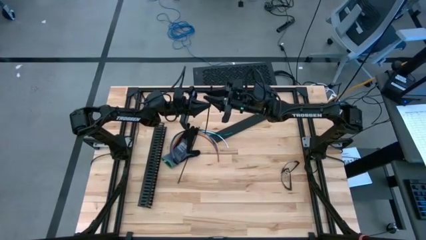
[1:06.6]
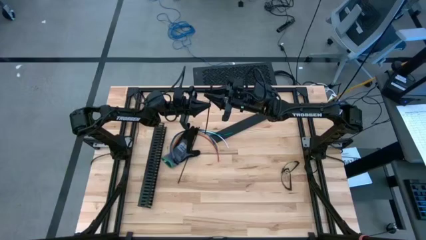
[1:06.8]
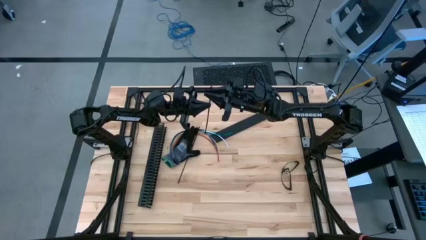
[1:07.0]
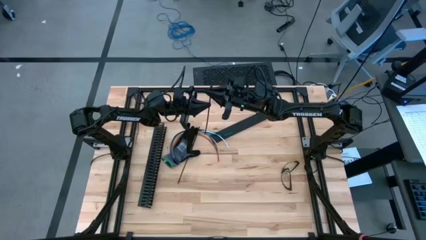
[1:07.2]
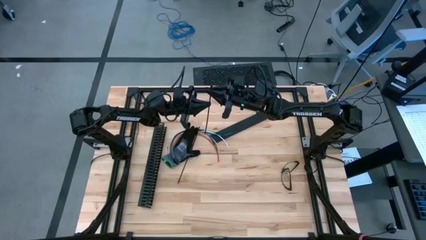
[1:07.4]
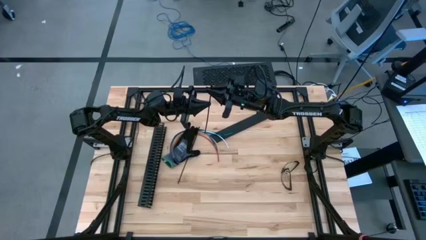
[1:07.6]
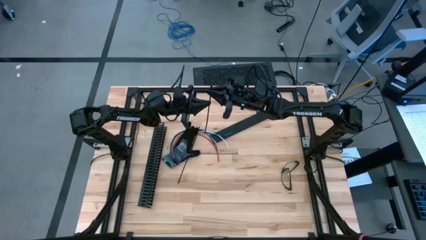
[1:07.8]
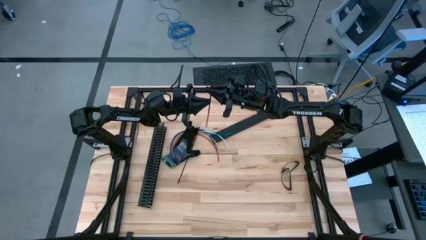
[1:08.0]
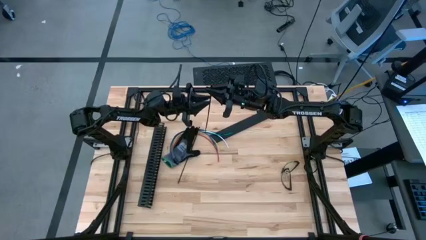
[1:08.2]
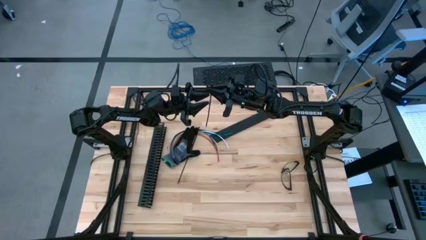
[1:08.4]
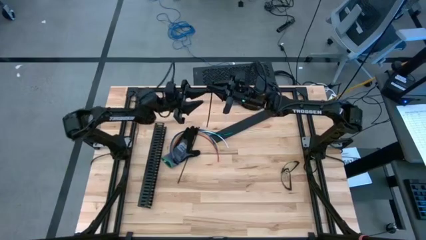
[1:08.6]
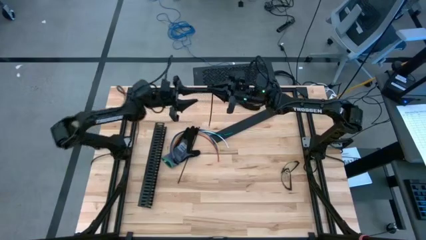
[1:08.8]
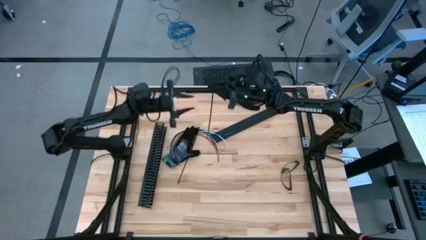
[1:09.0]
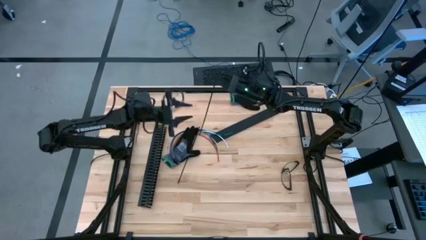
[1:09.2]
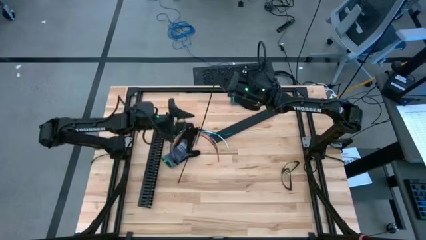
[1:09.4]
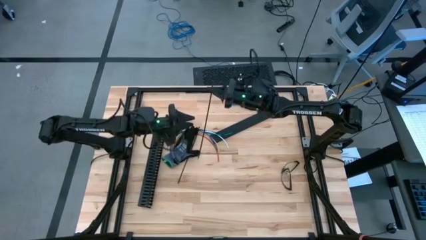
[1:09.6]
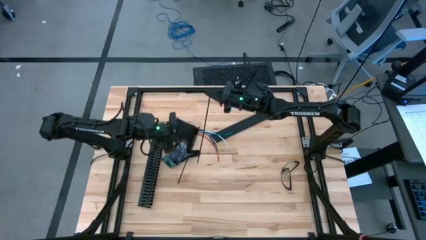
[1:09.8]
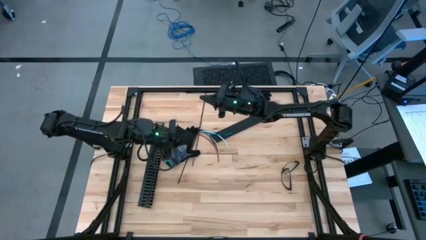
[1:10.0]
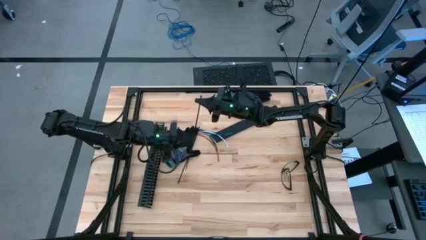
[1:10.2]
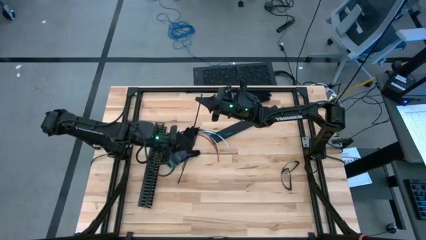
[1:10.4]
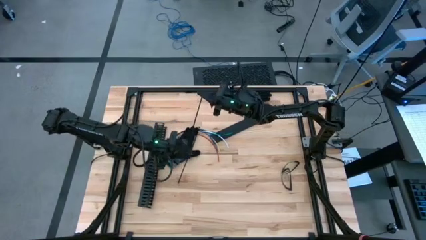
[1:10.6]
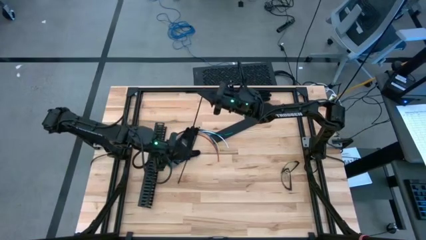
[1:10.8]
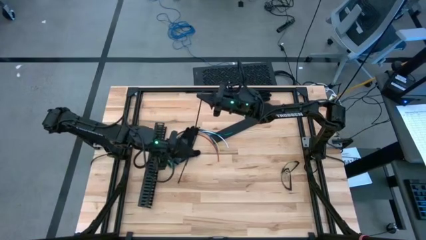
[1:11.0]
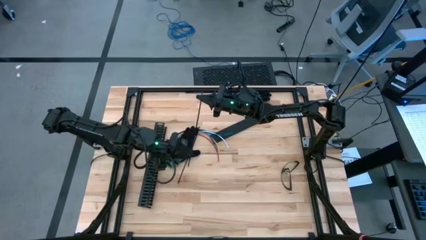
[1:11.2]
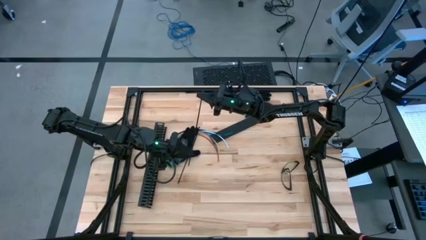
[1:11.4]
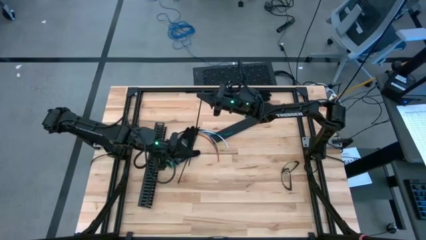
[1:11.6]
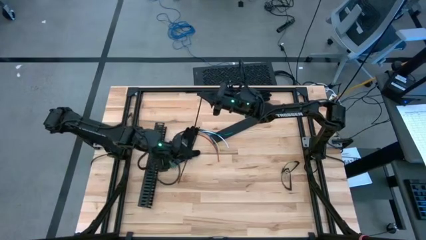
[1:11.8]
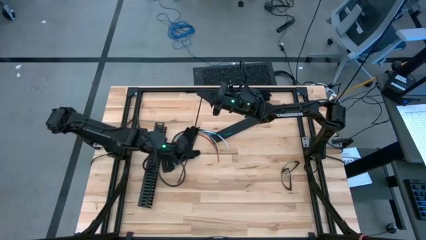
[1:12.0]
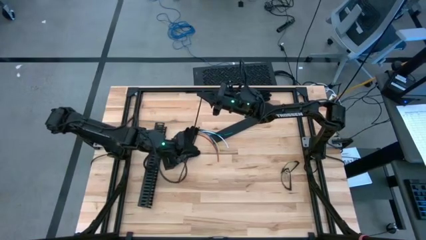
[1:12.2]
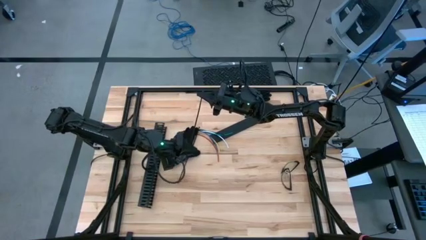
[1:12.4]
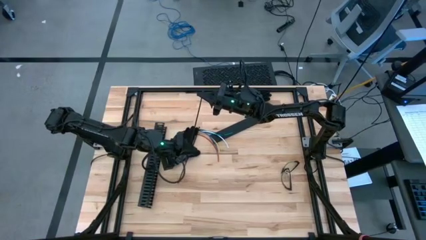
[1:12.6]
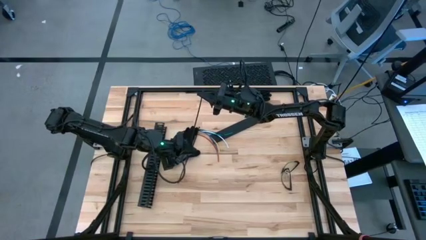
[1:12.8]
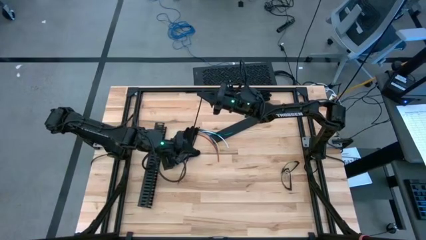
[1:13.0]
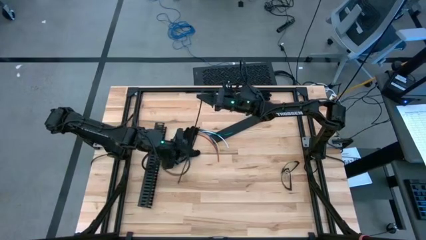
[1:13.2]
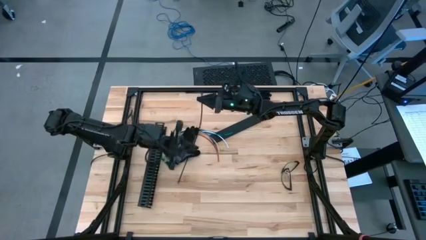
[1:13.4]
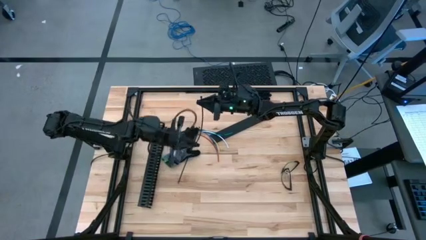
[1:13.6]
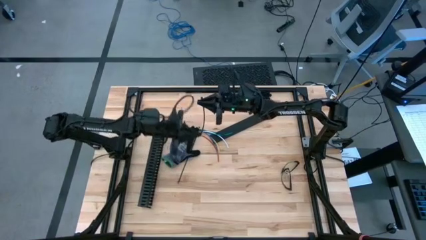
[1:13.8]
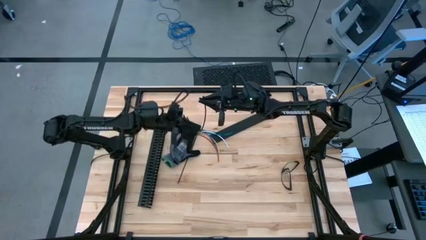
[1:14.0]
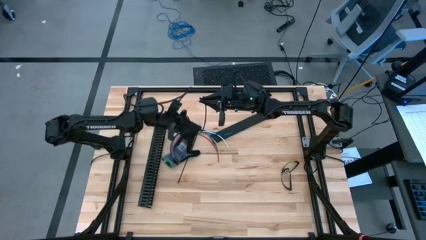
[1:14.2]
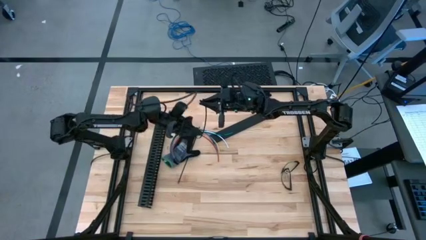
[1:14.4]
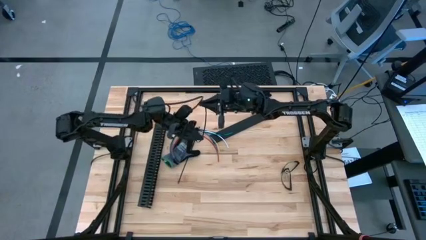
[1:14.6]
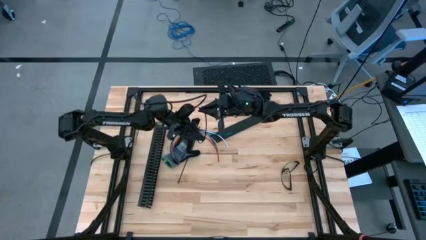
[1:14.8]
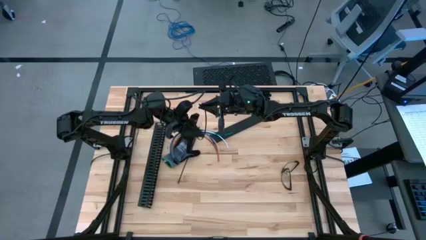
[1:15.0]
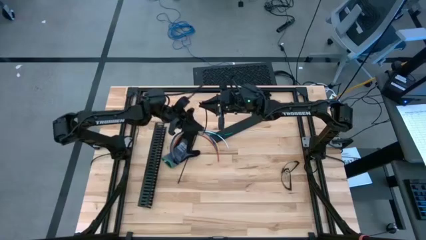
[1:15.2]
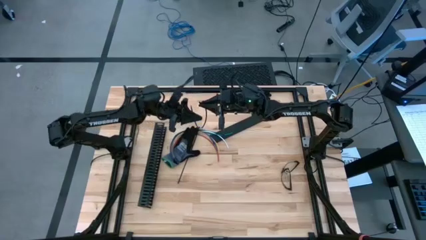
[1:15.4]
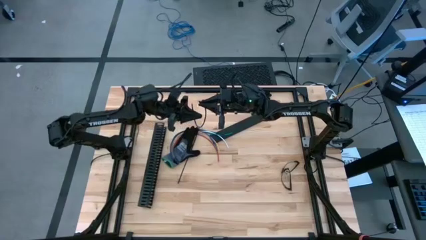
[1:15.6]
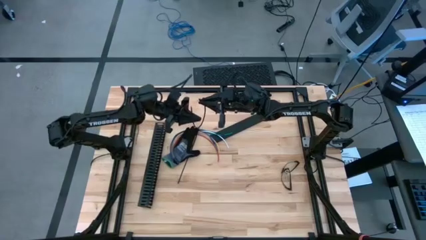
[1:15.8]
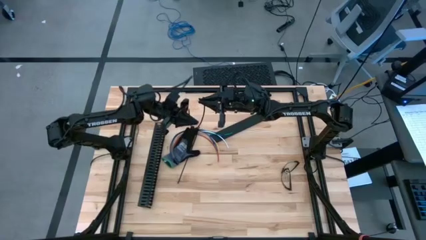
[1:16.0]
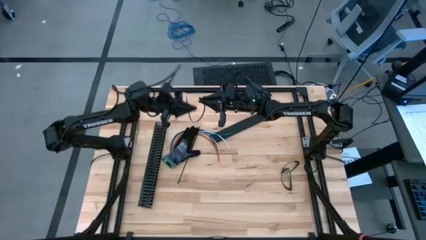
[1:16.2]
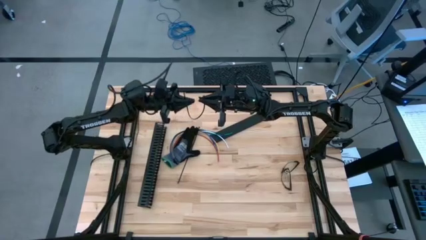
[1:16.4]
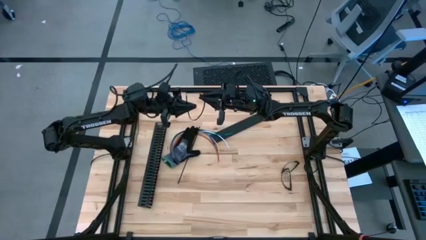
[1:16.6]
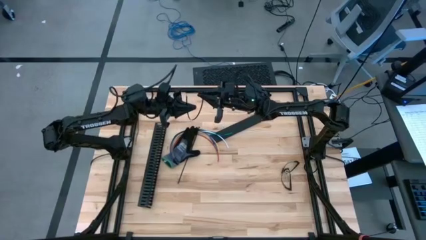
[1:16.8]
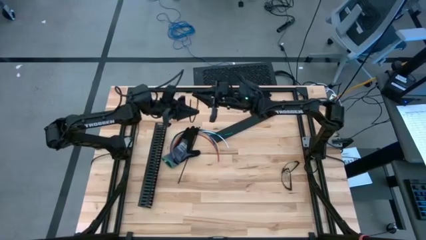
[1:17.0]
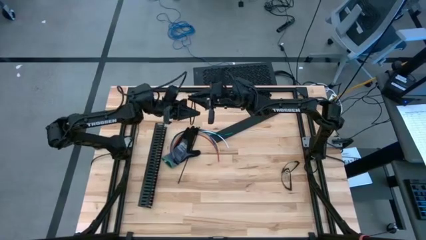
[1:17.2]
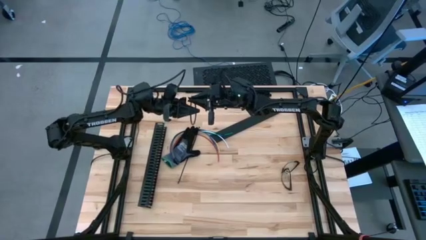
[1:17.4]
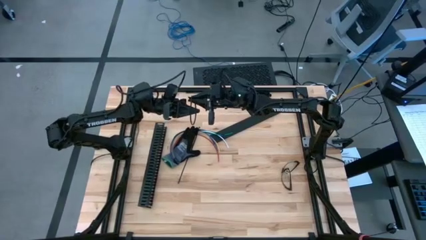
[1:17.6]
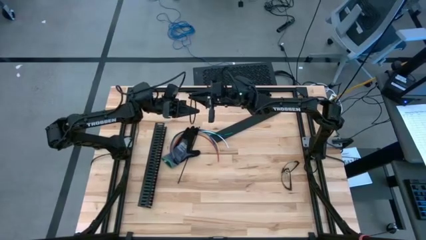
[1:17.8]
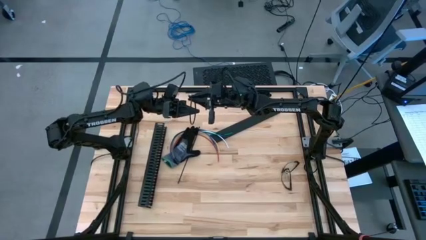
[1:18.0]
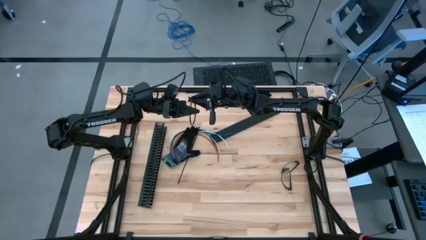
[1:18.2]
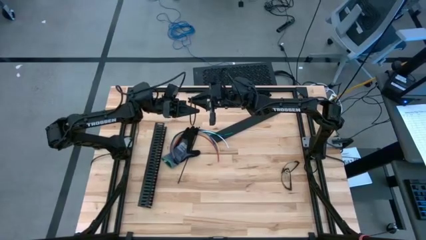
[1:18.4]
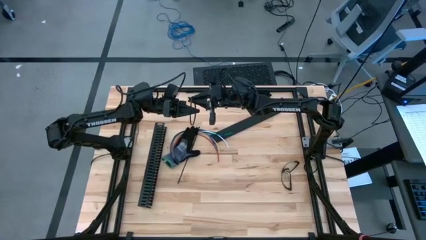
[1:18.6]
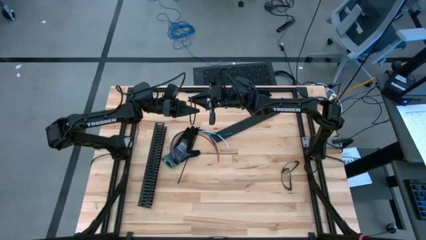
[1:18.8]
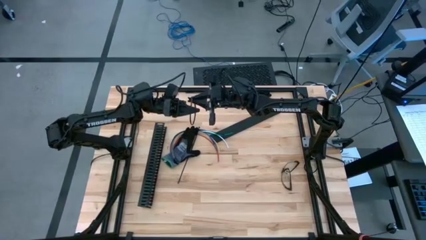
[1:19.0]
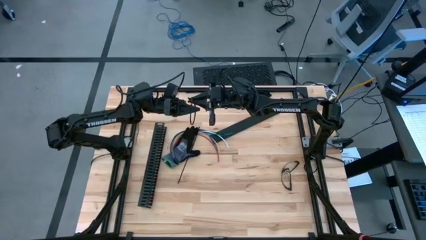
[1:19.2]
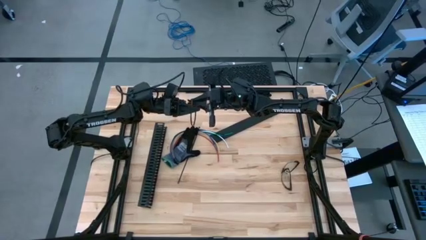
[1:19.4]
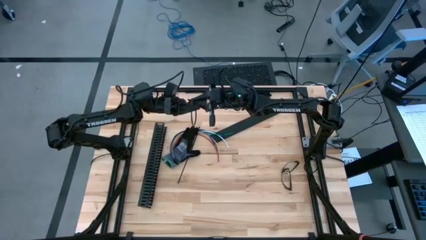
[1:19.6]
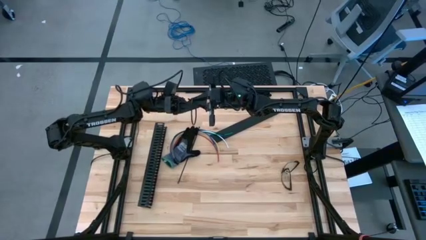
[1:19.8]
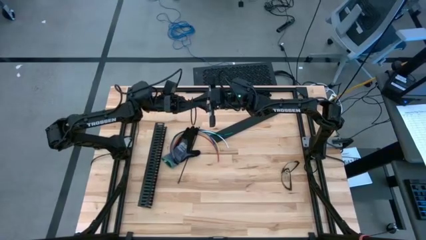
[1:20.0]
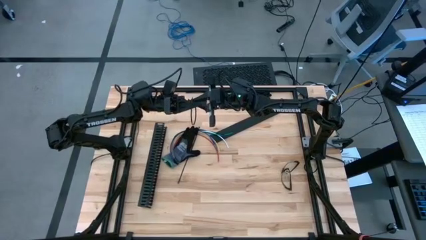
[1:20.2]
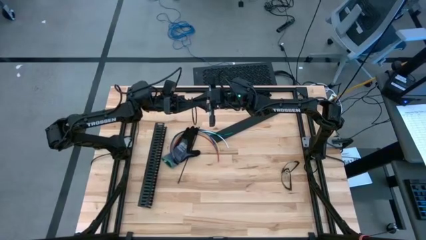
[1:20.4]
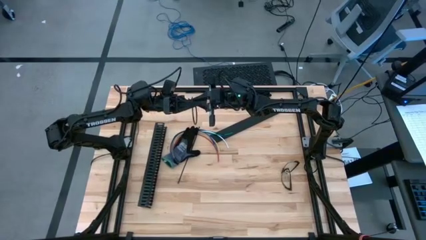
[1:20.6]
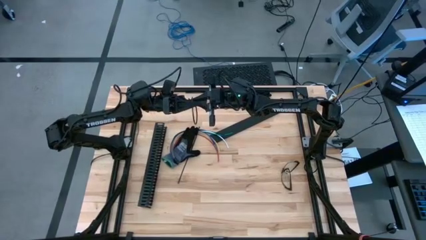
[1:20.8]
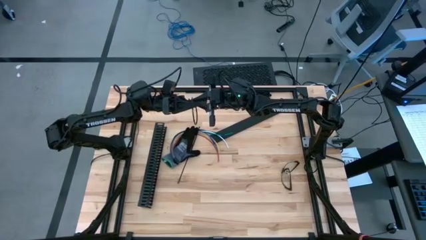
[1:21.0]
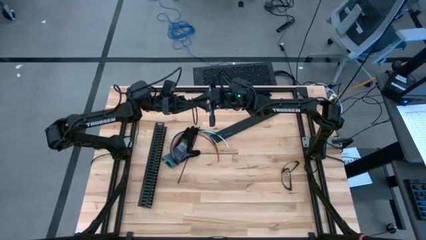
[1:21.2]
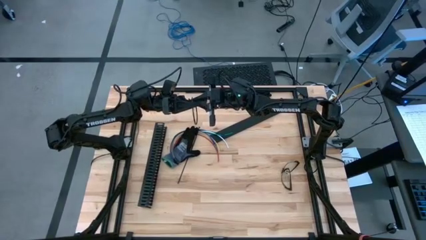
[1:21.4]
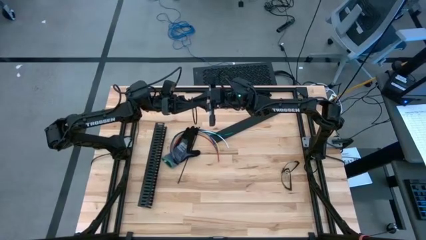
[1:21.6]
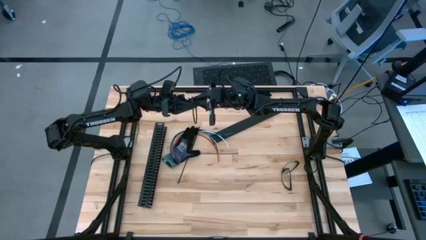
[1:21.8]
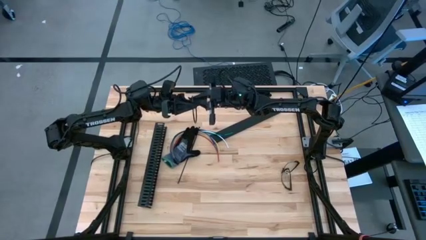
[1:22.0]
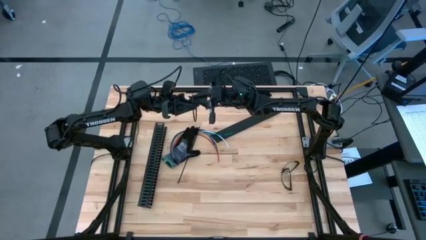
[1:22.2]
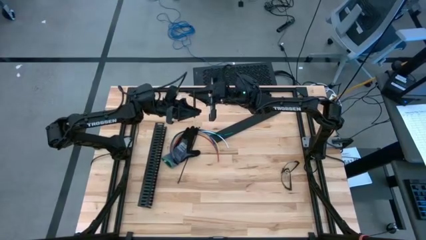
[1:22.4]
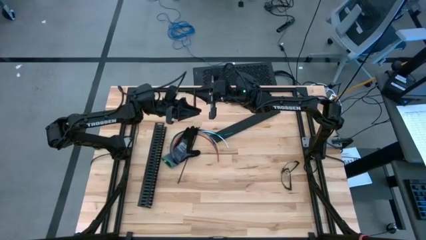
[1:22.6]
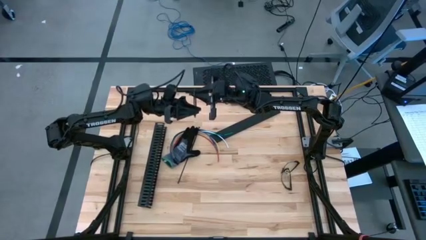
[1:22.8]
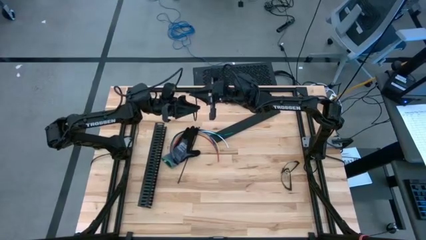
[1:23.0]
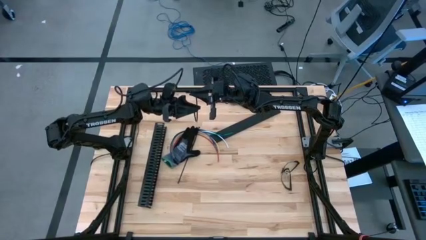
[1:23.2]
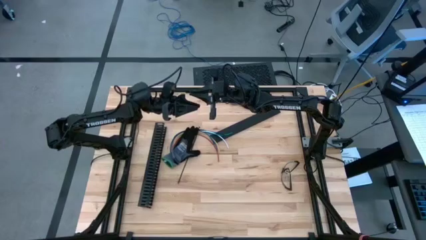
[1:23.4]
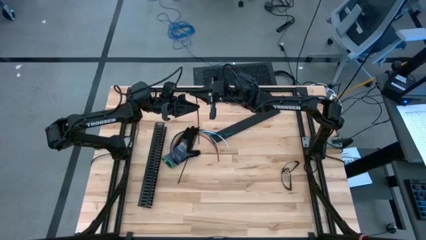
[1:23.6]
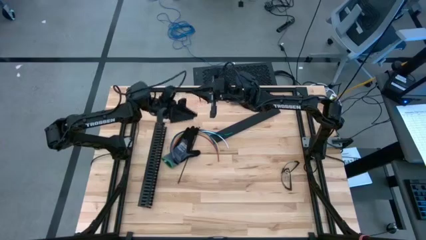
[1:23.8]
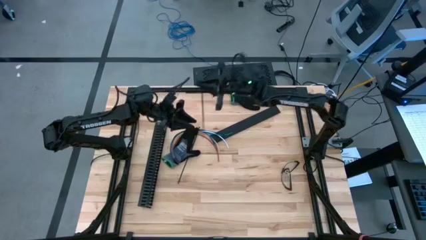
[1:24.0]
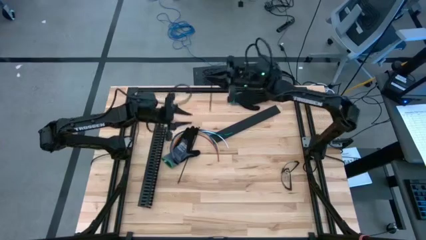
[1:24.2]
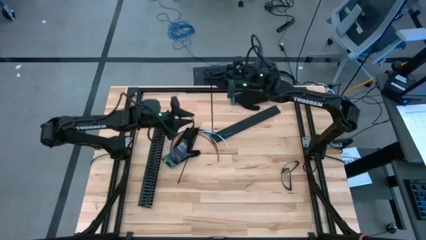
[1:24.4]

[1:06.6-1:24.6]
Task: Ziptie cables
Wrap the cable wires with the black zip tie
